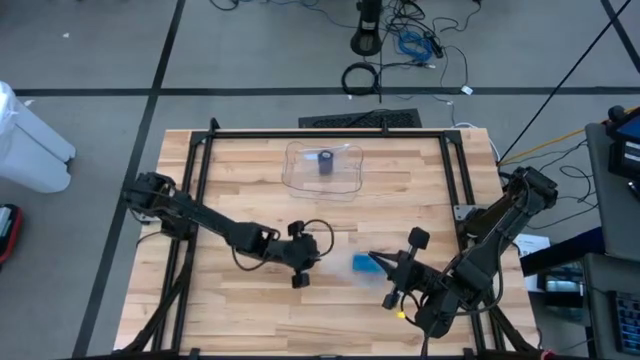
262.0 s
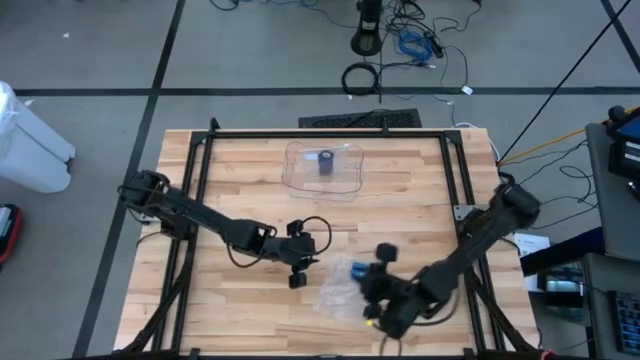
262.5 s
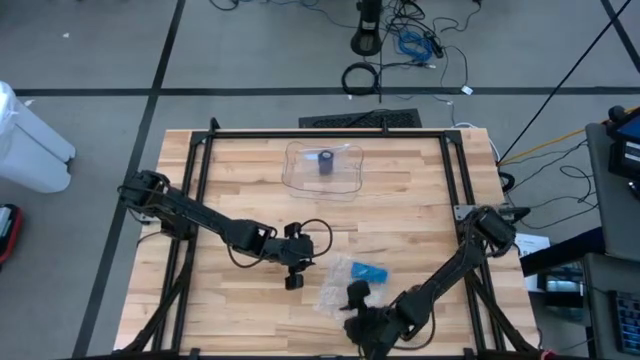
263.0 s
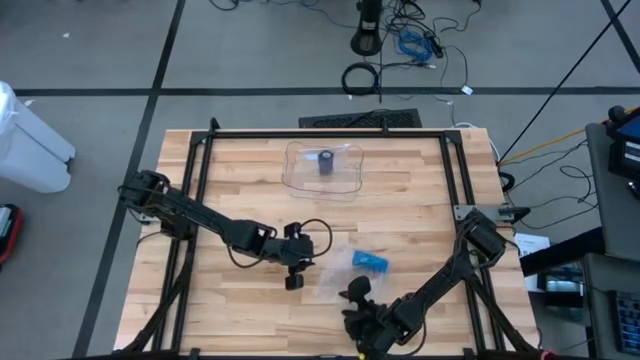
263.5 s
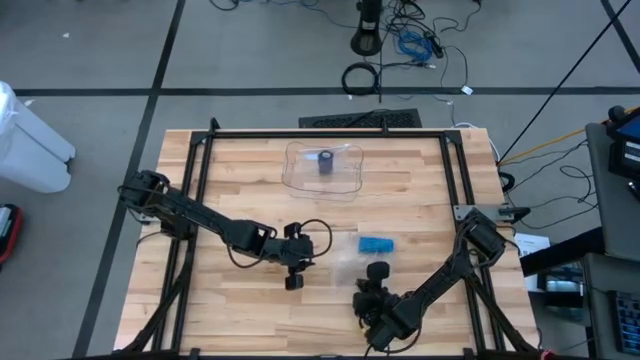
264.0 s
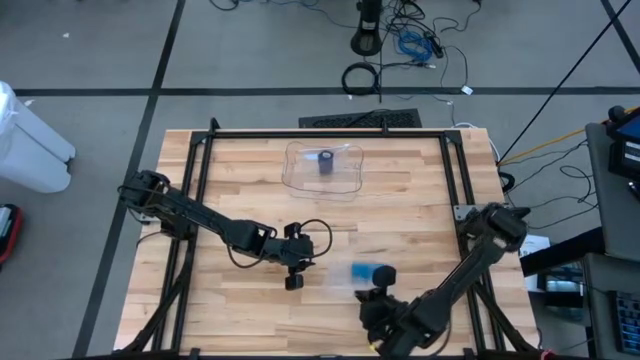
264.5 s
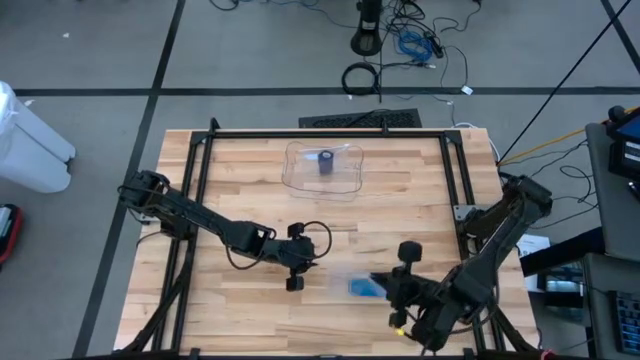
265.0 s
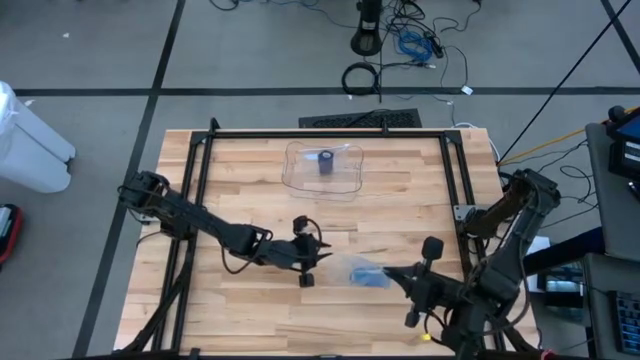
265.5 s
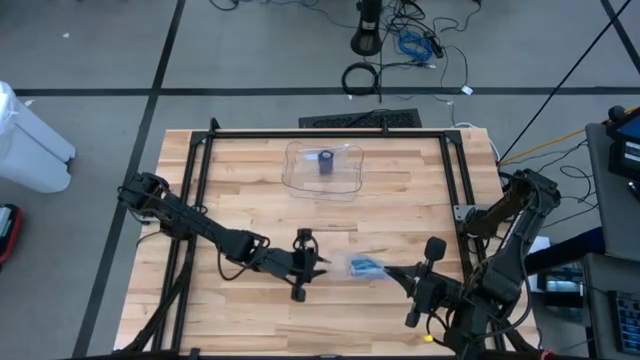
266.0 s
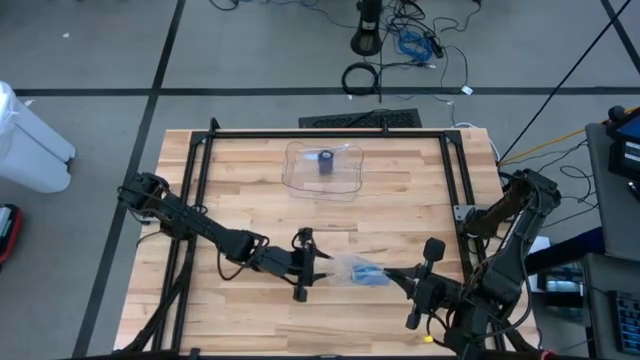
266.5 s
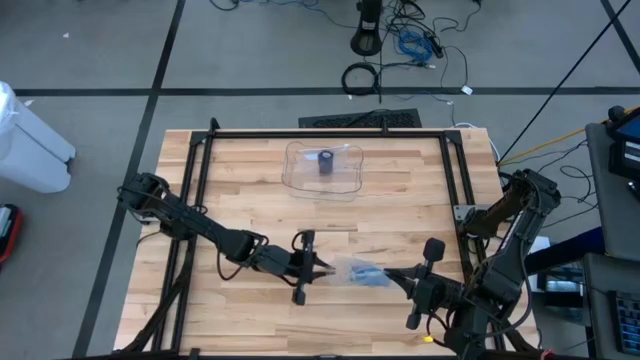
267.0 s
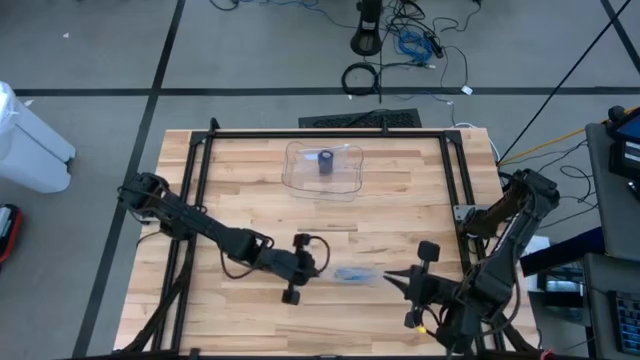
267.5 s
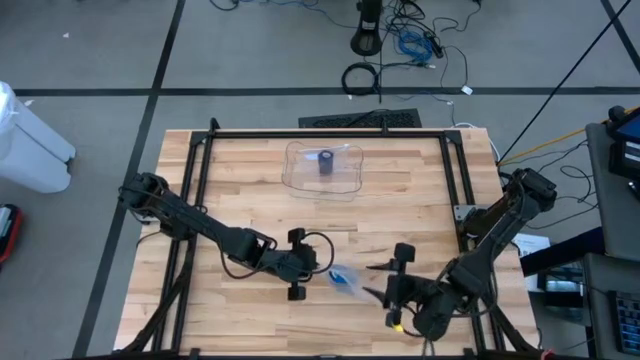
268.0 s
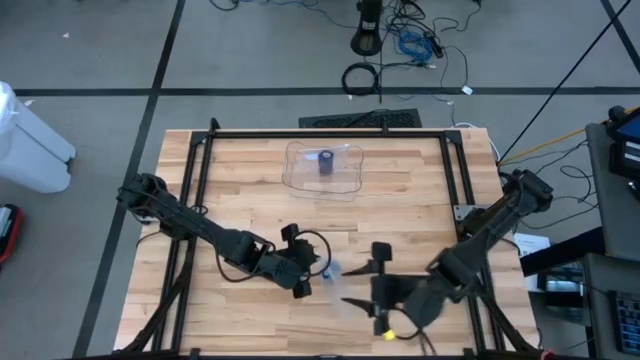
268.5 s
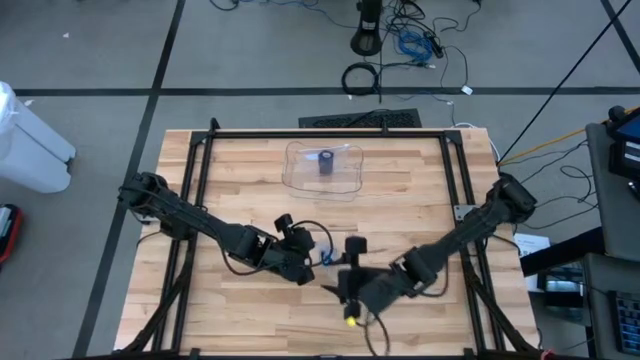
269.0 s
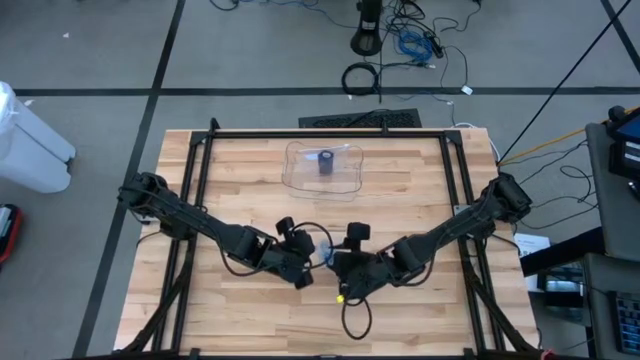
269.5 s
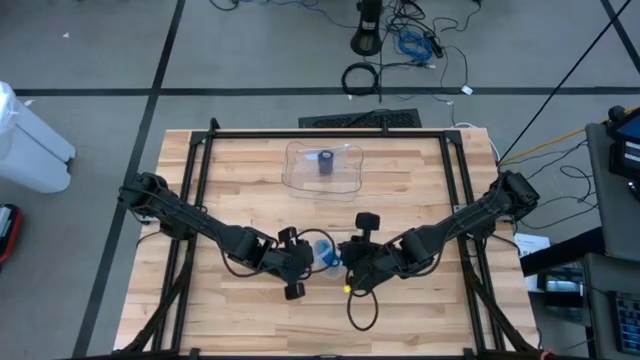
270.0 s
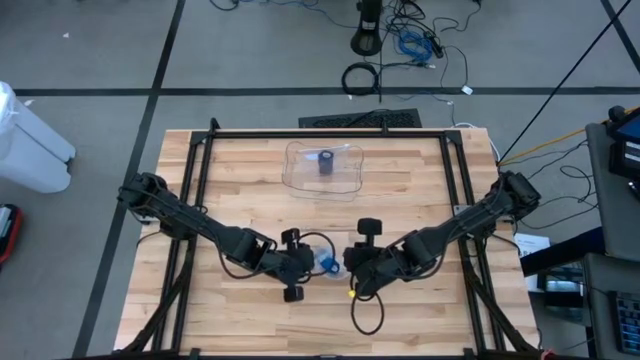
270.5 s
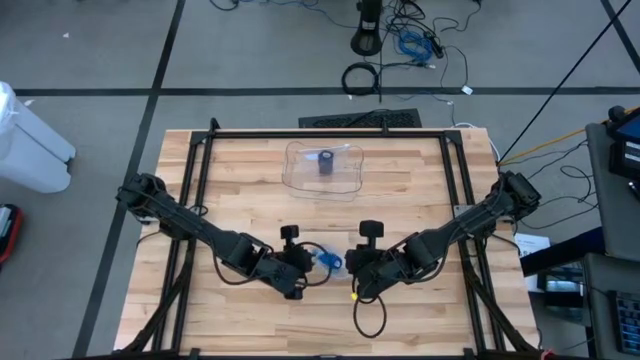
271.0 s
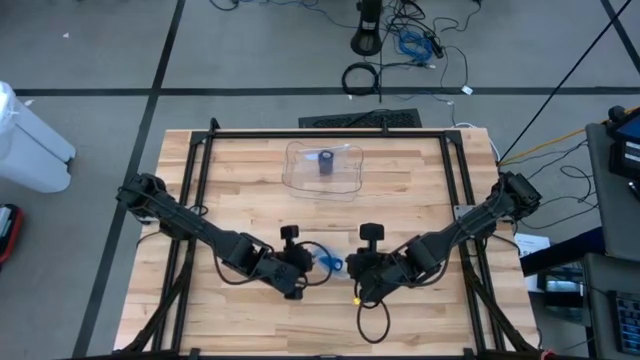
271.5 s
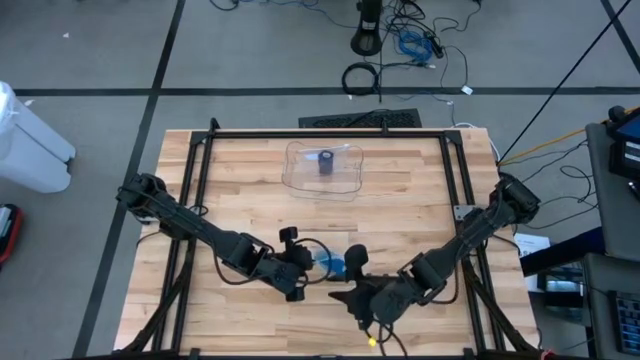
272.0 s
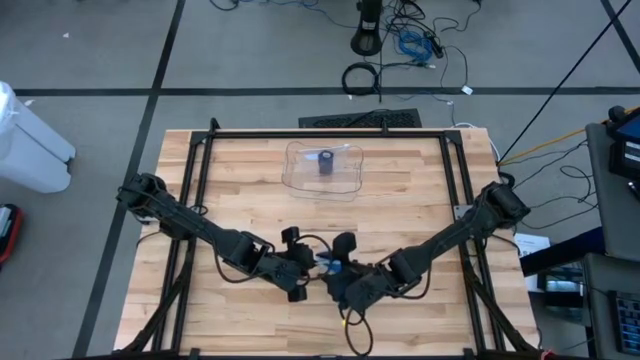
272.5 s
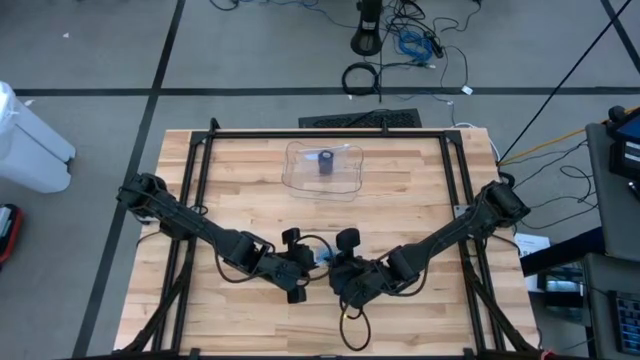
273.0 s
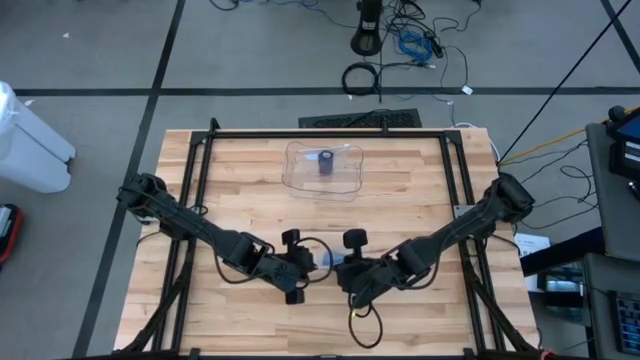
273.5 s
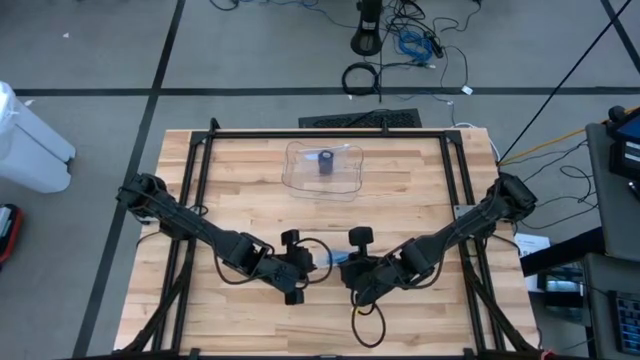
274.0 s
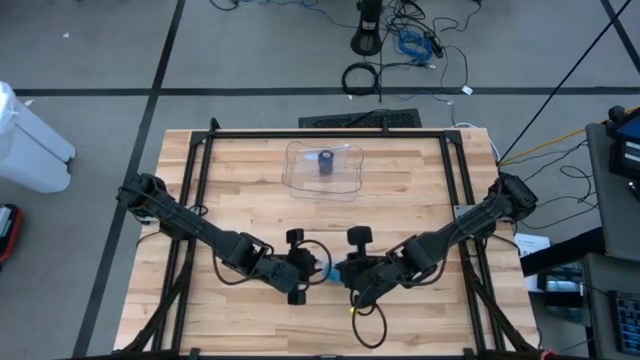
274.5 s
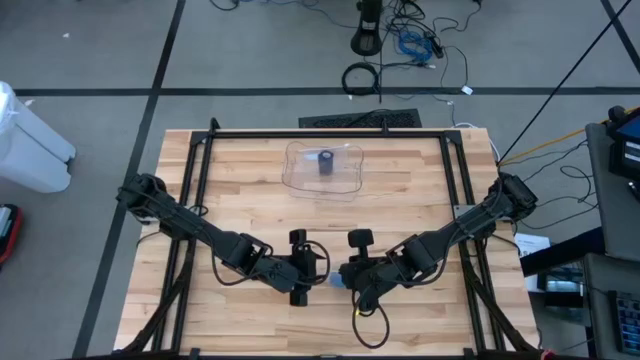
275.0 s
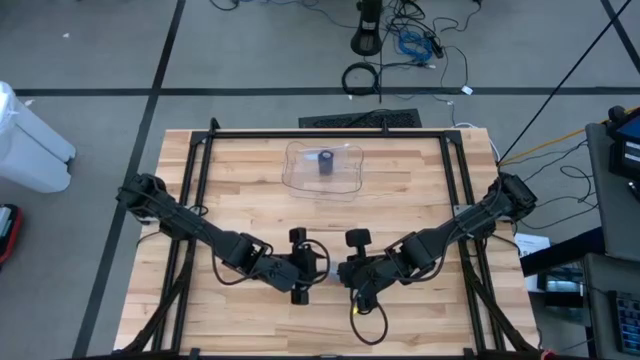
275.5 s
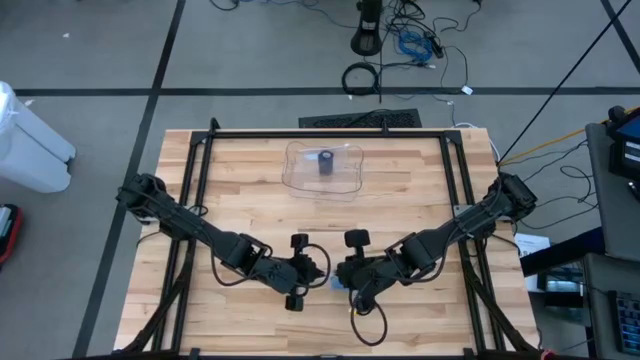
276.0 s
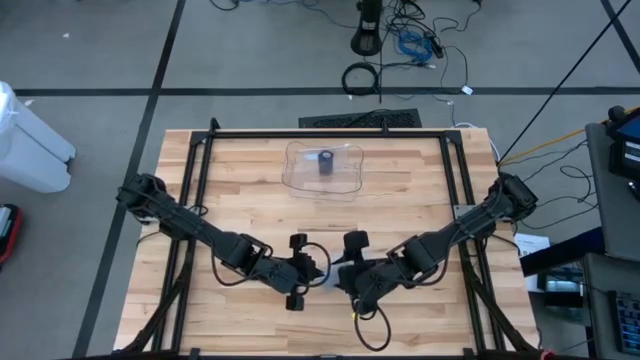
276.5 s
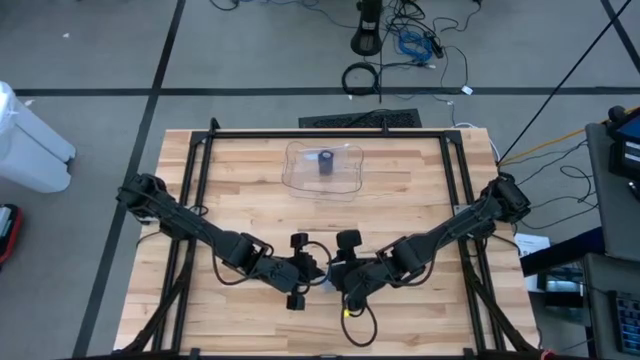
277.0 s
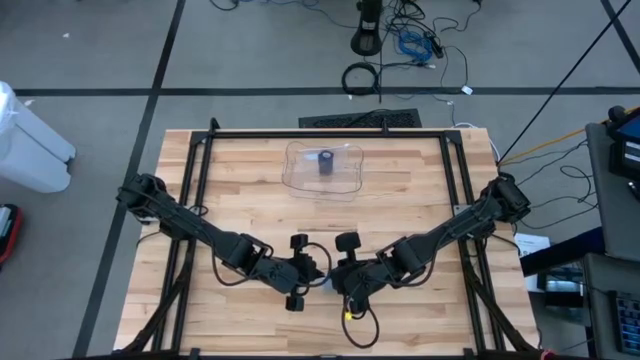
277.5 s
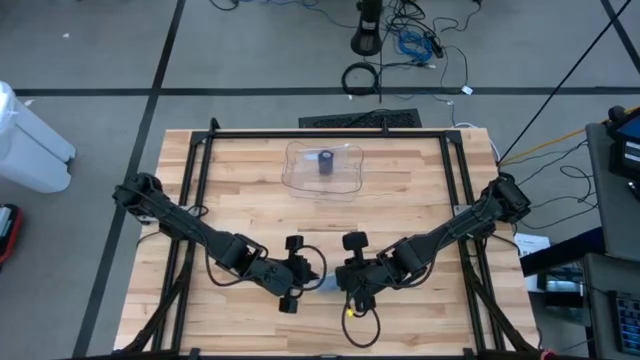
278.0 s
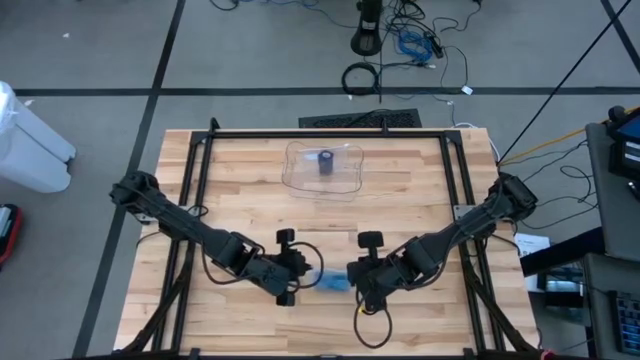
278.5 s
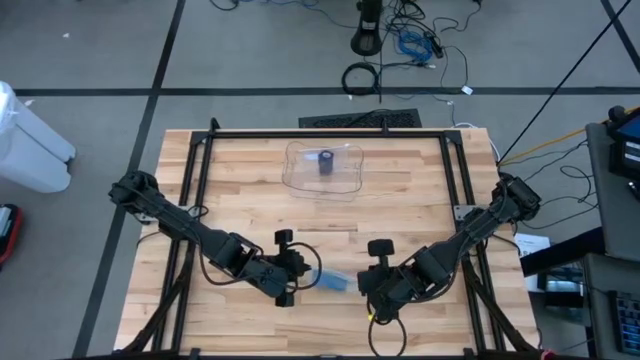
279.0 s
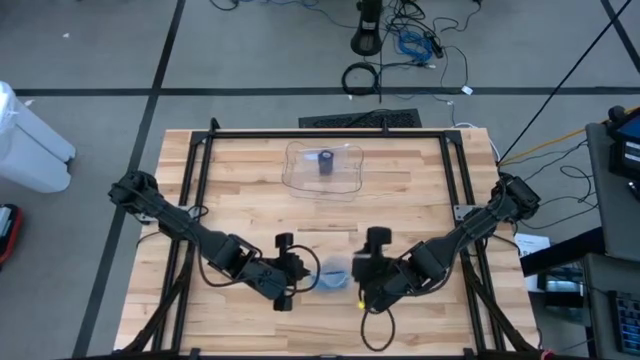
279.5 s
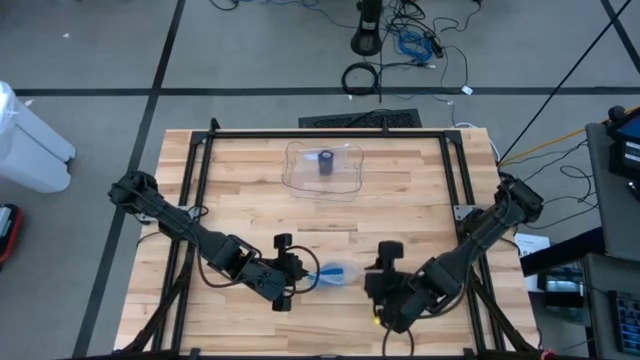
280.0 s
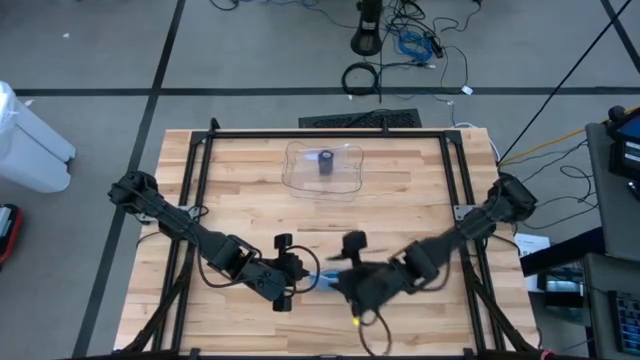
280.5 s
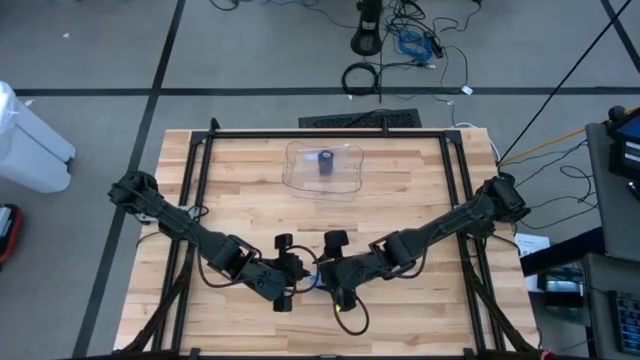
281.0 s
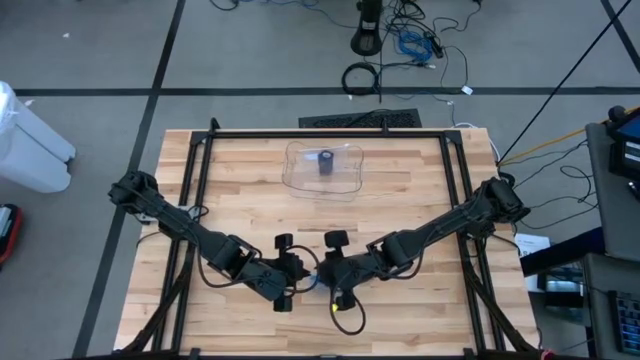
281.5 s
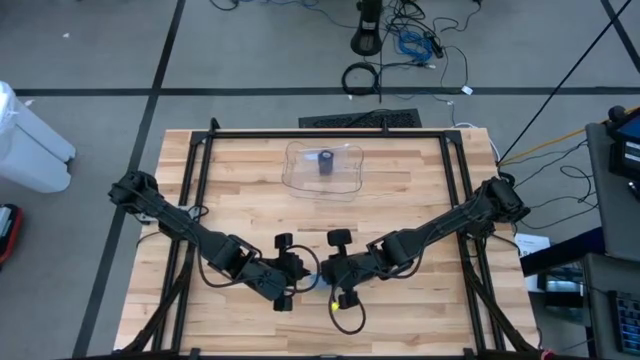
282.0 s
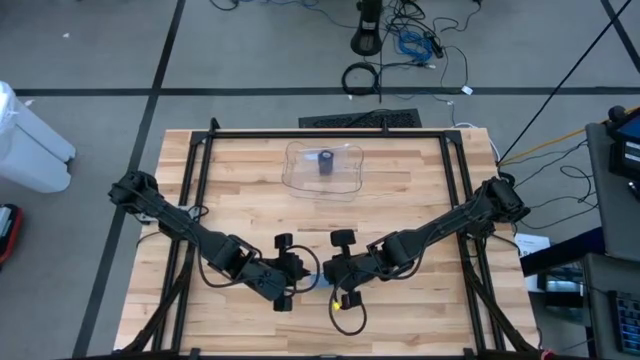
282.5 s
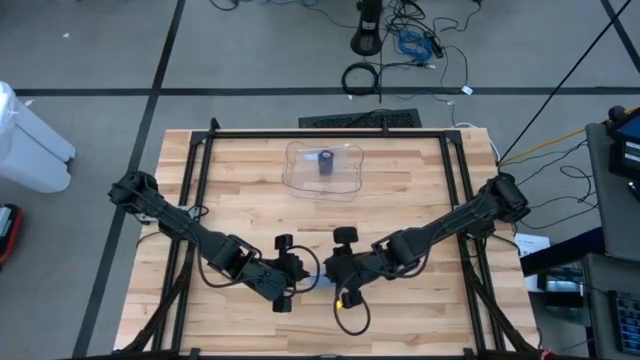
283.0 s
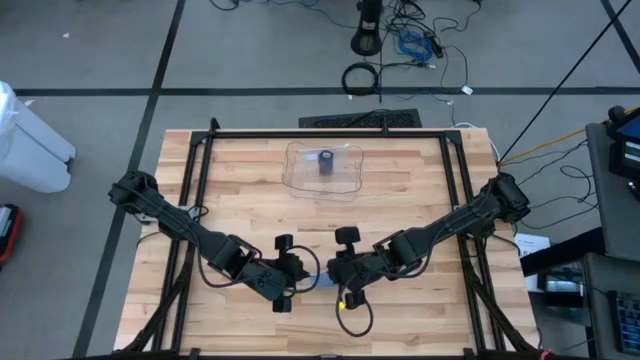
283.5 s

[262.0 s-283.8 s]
Task: Roll bandage
Close the transparent zip bag
